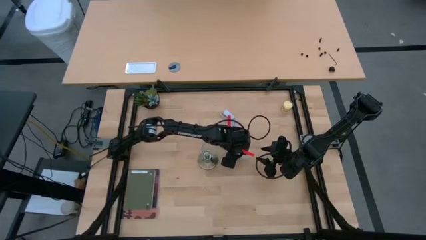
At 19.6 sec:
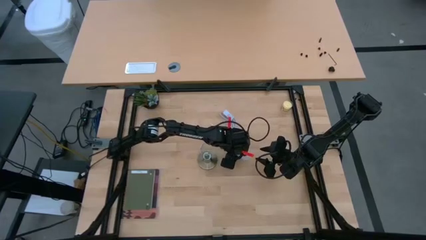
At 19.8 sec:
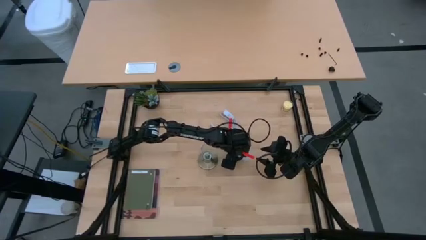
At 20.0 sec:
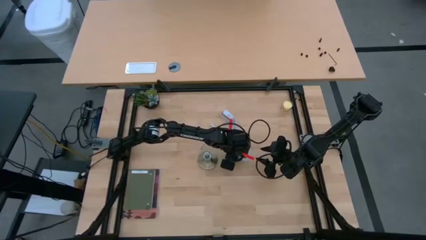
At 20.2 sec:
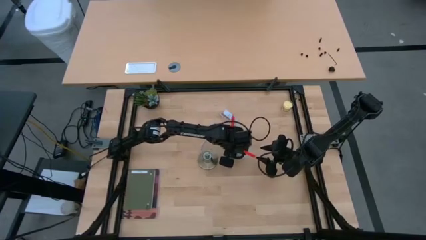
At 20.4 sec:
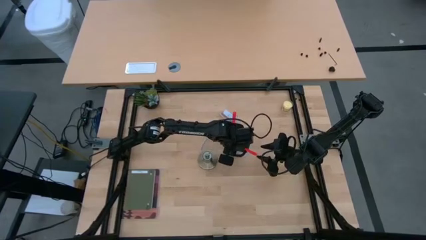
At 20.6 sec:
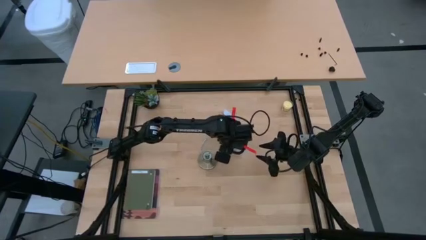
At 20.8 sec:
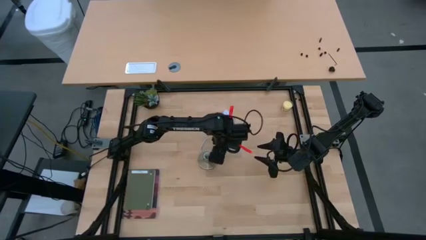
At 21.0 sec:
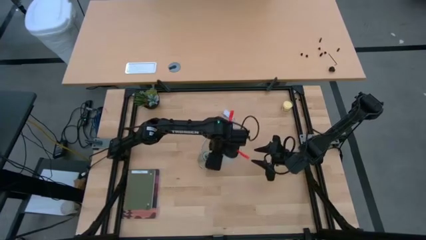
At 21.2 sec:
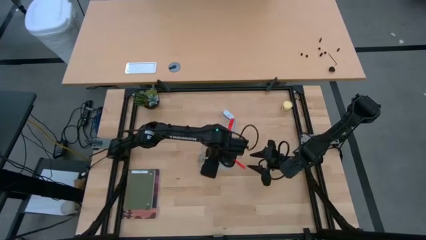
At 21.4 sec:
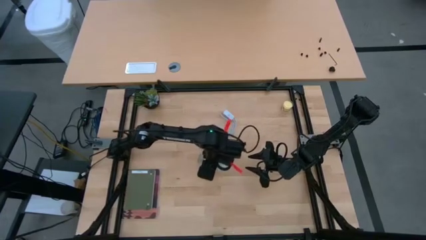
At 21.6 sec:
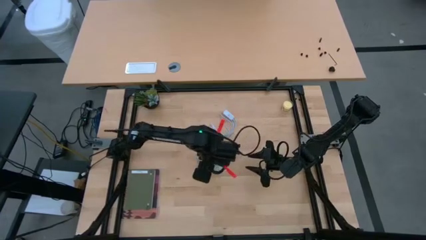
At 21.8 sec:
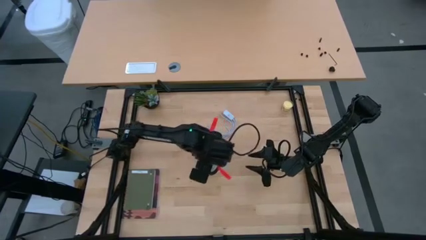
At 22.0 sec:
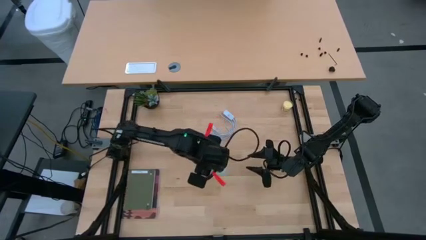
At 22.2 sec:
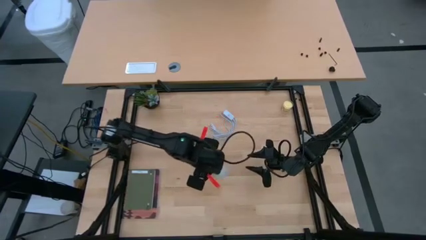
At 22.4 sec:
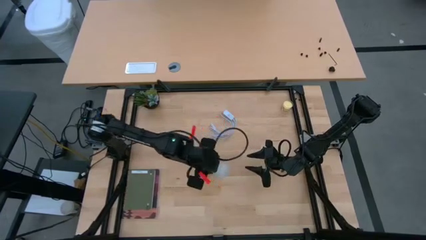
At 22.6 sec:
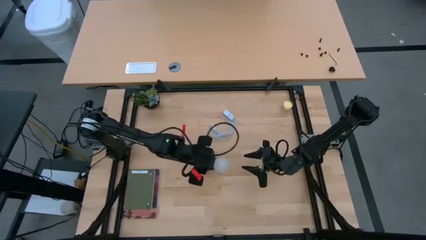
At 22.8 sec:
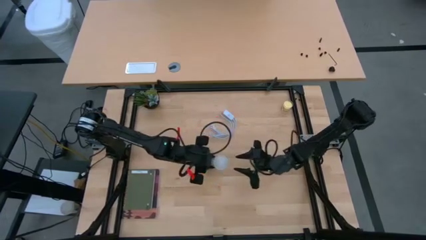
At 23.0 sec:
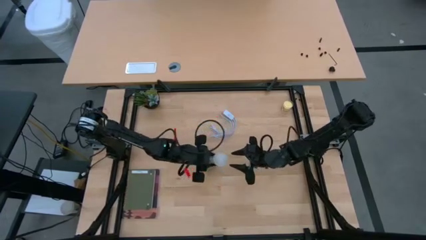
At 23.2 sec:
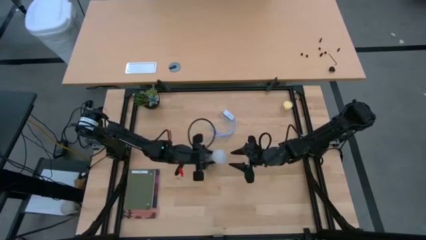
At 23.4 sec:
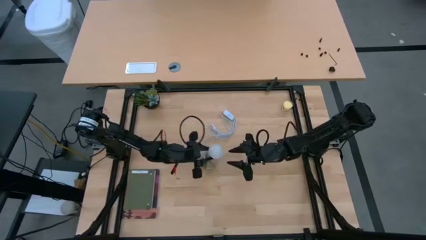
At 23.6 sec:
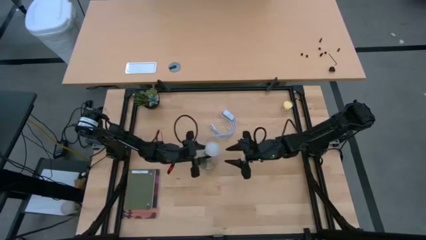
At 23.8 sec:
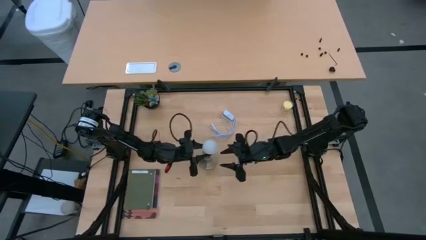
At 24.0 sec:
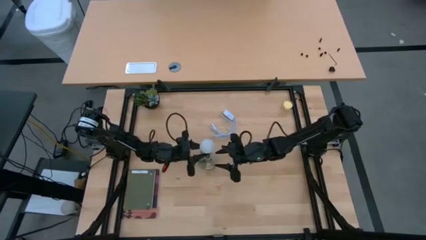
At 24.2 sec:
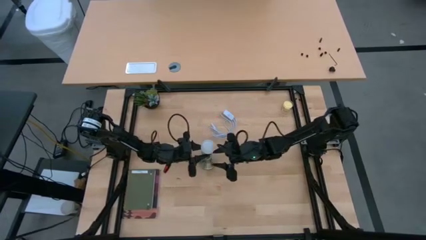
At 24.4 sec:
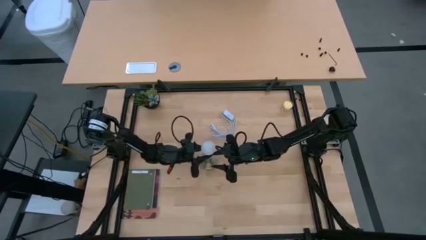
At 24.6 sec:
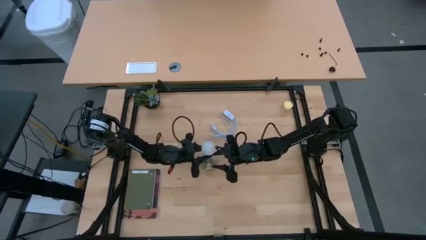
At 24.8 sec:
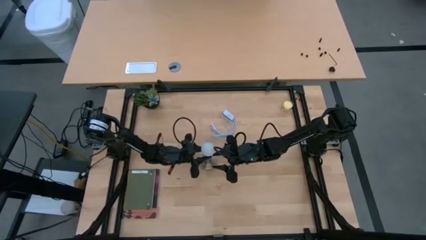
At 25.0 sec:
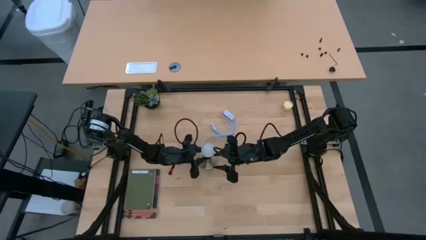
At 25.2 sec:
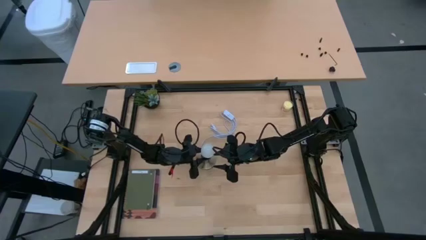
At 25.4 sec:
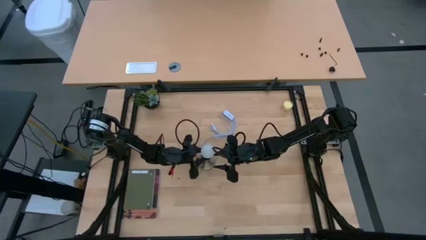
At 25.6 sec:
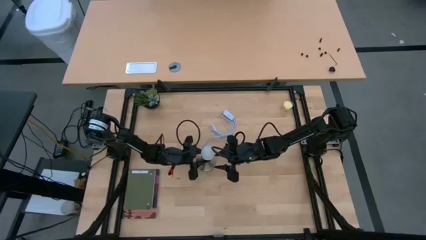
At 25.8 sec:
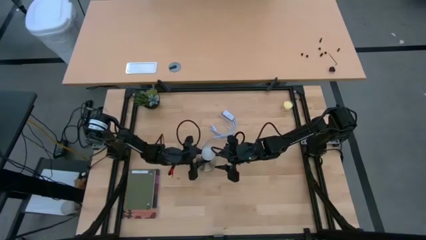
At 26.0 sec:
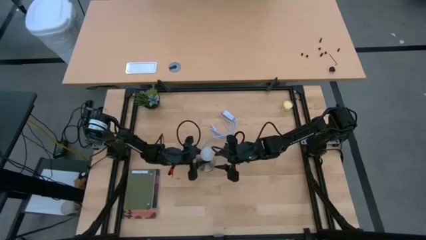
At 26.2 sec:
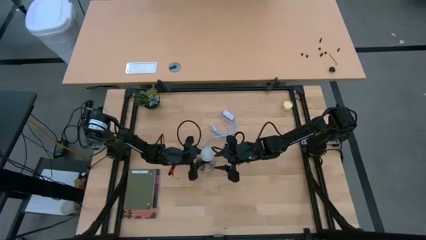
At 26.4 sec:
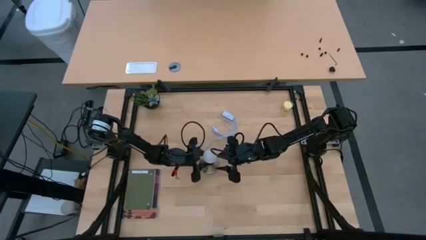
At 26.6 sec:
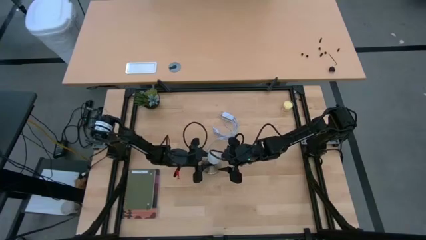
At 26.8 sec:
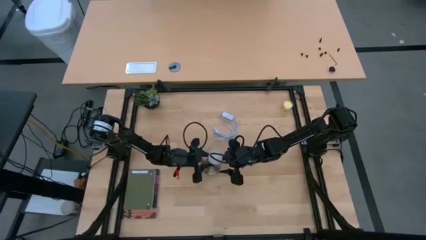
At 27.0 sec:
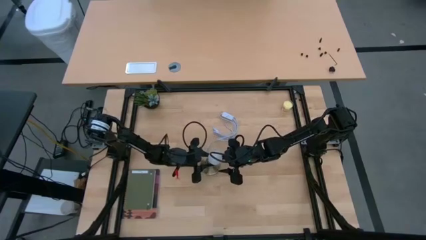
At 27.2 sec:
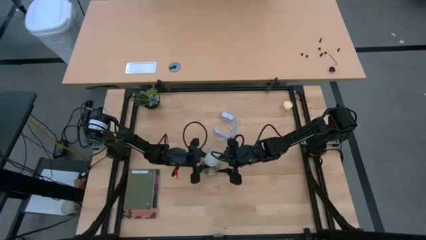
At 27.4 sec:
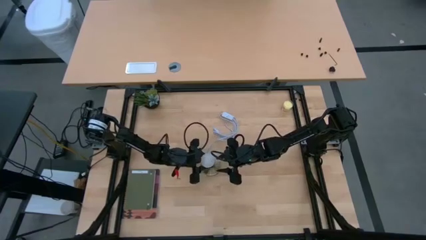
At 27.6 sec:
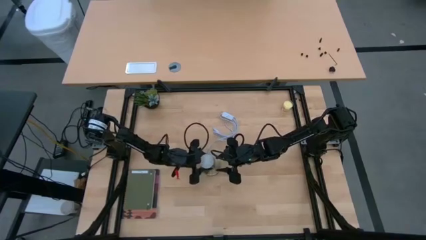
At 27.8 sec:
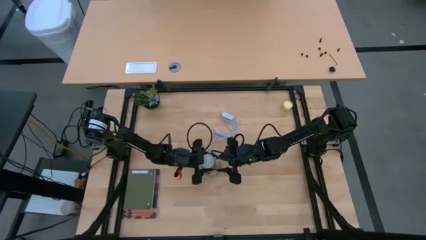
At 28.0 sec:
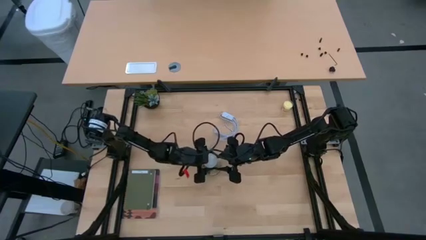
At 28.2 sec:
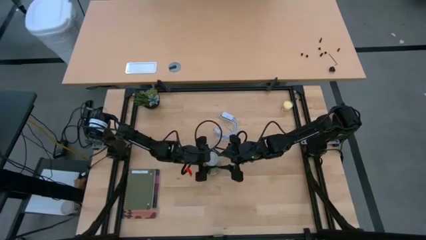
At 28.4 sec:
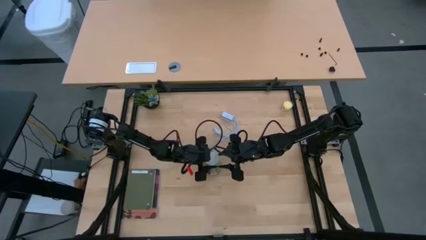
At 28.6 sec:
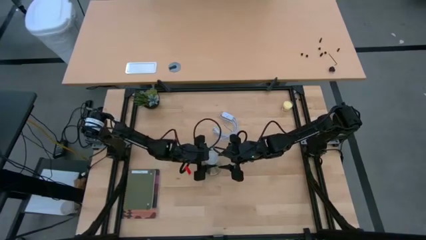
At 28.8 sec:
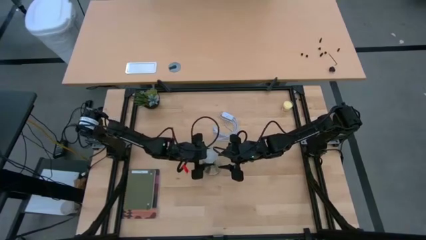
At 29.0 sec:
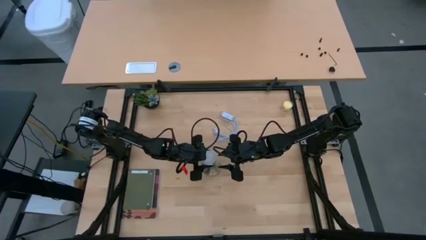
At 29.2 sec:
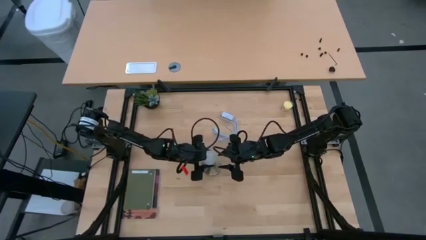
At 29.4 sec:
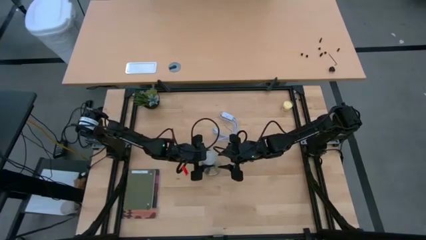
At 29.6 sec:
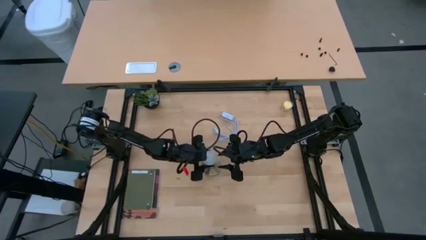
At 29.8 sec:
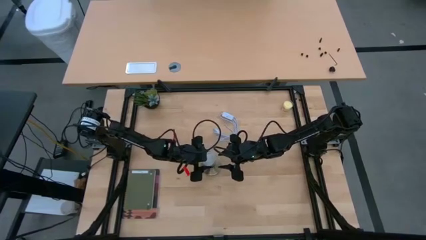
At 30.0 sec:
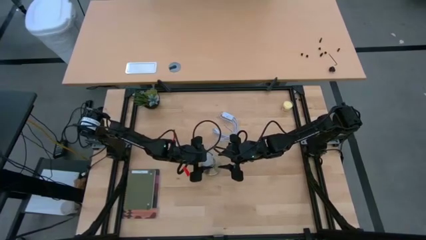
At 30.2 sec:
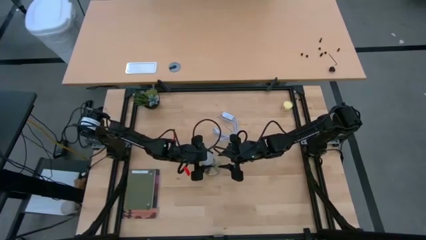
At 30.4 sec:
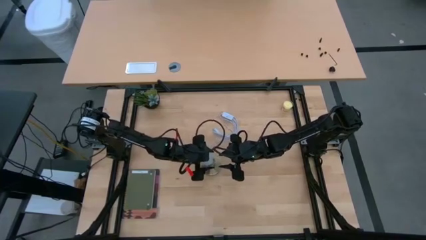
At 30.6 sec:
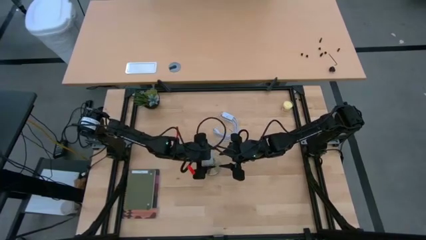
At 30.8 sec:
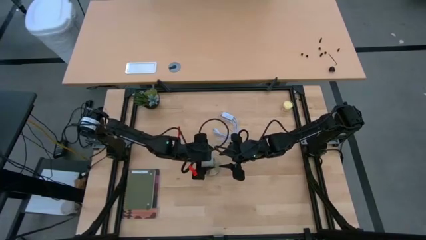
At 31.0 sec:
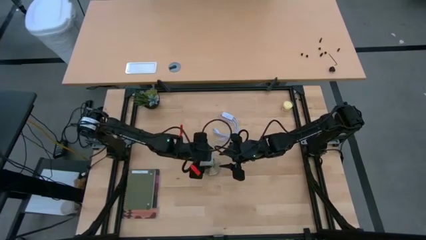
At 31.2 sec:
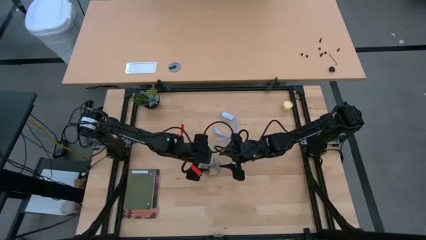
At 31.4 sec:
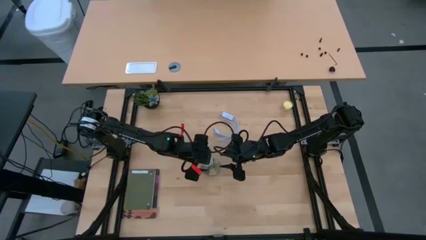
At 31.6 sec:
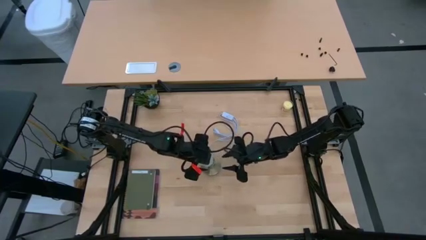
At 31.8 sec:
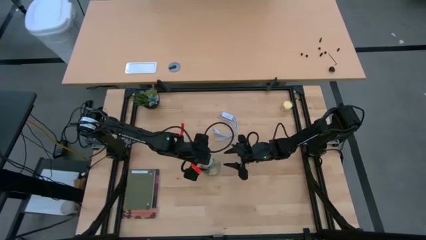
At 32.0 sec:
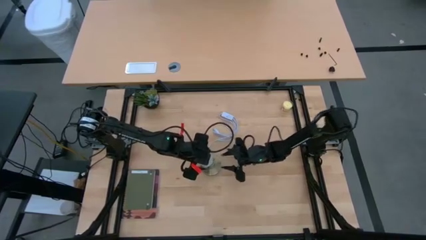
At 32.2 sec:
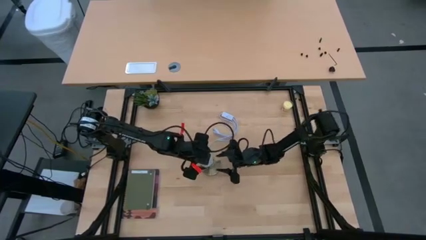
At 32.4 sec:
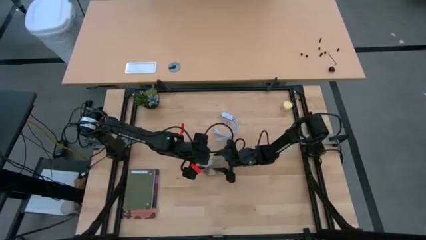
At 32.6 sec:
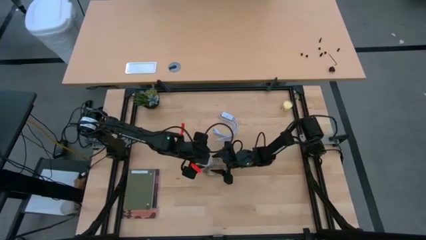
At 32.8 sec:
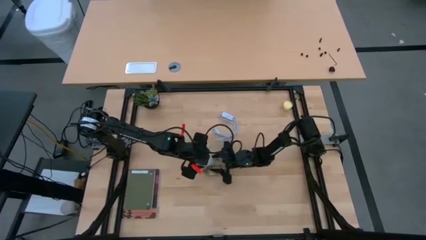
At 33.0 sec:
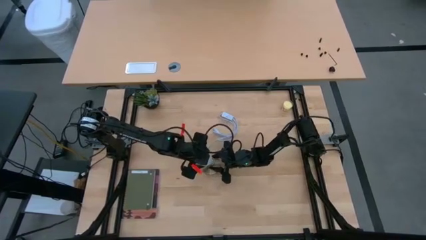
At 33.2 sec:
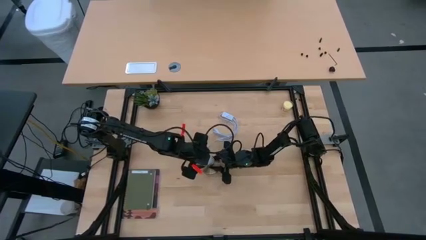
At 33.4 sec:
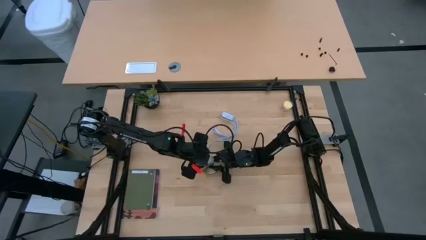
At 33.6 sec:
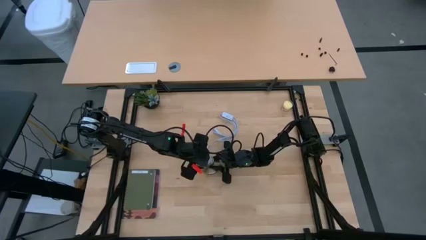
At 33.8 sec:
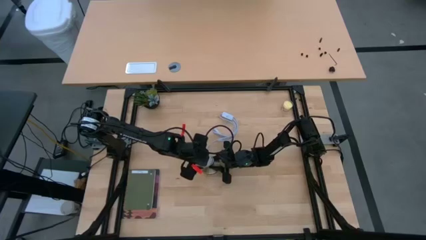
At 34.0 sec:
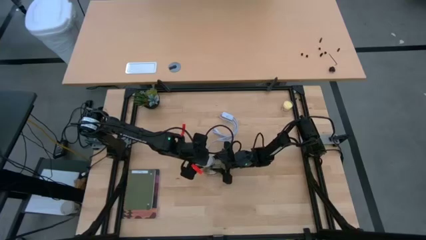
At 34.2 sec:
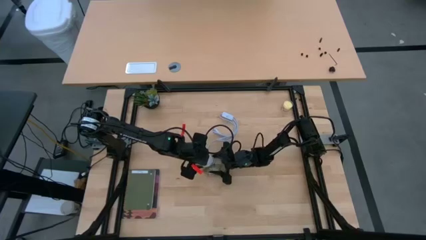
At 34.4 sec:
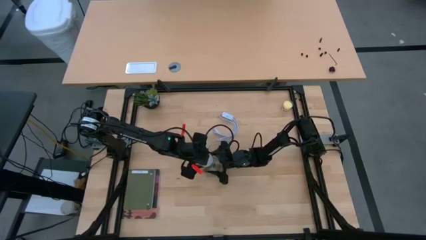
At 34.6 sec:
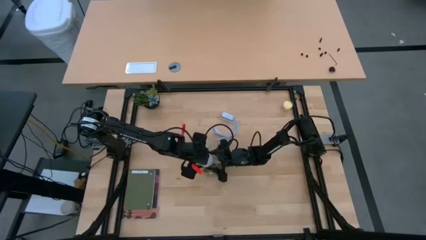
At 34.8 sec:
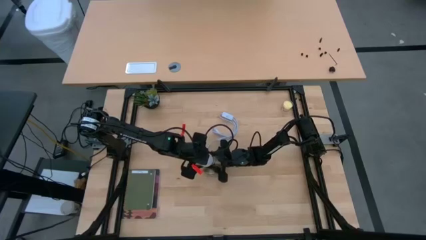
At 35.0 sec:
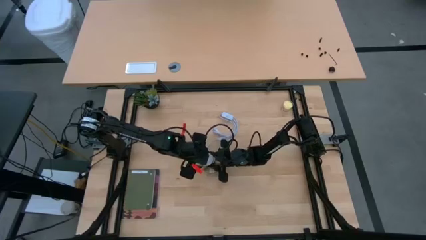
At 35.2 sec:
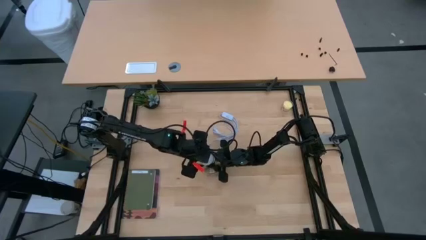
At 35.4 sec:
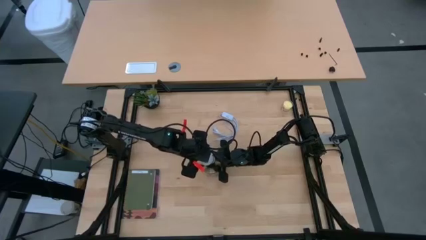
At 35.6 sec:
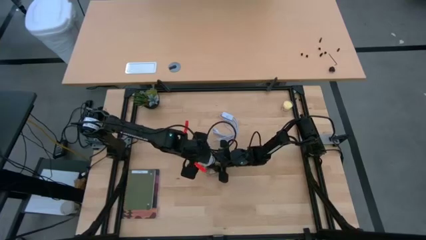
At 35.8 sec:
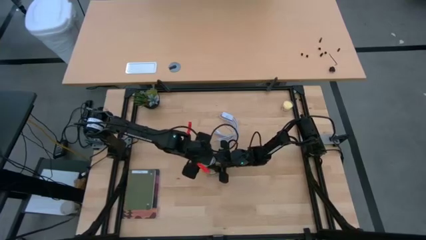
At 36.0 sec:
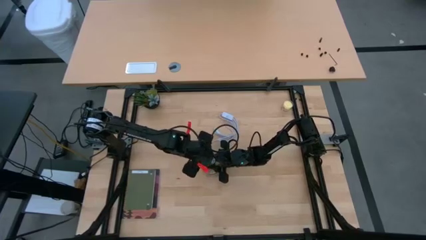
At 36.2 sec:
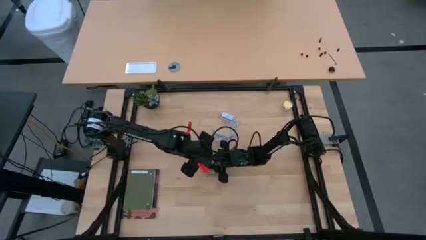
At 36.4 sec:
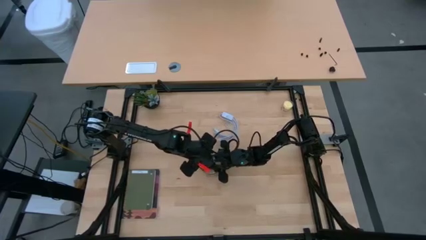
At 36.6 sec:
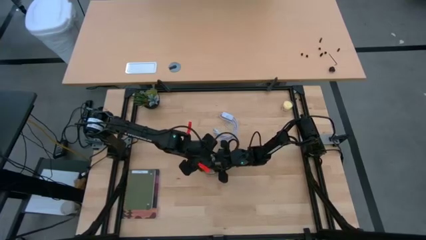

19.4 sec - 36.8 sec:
Task: Screw lightbulb
Insert the lightbulb into the lamp
